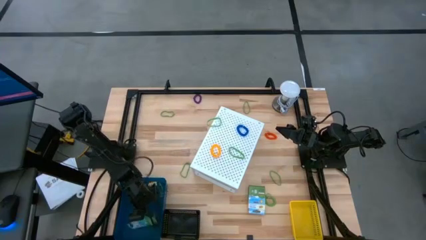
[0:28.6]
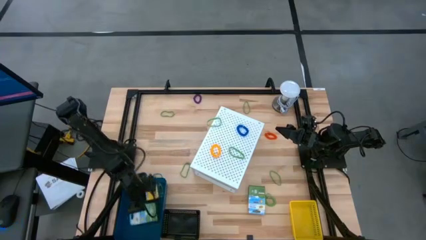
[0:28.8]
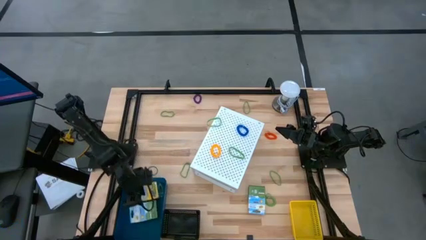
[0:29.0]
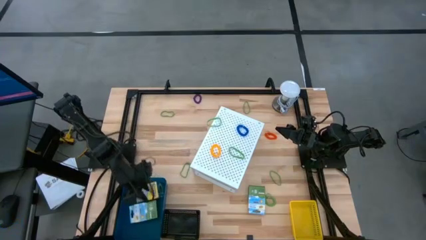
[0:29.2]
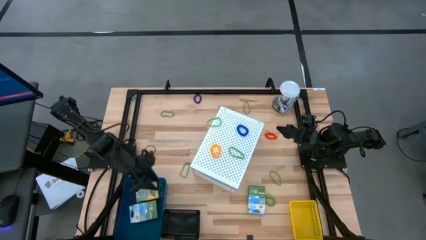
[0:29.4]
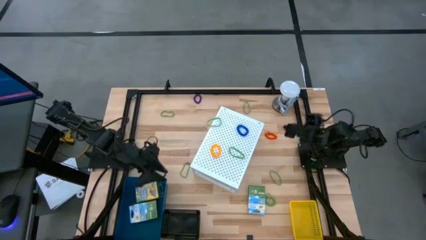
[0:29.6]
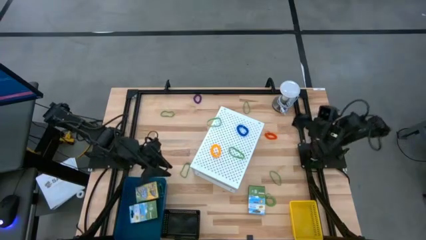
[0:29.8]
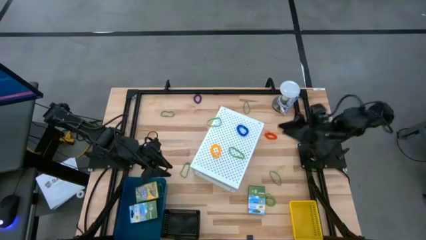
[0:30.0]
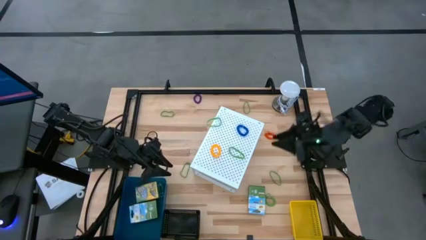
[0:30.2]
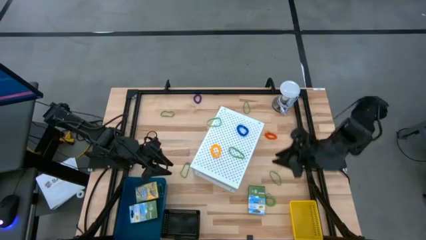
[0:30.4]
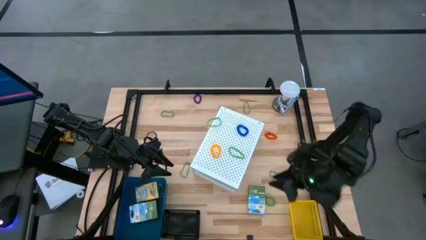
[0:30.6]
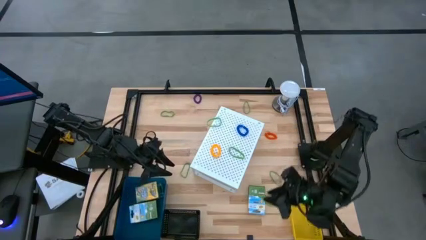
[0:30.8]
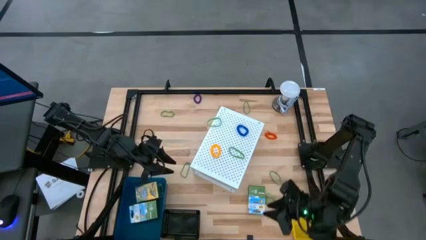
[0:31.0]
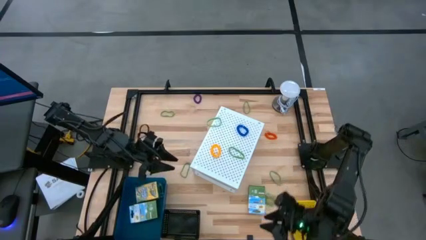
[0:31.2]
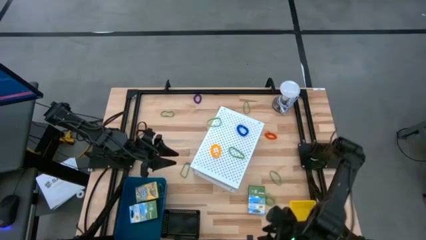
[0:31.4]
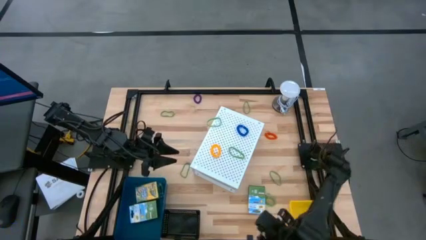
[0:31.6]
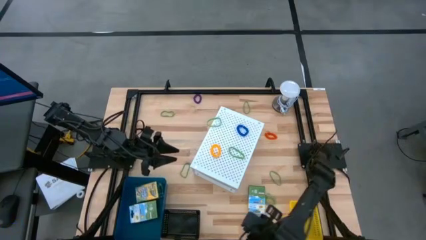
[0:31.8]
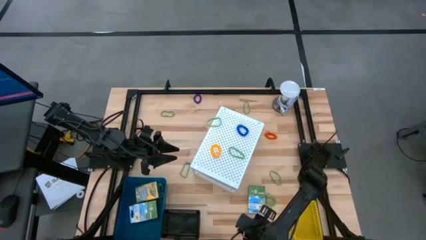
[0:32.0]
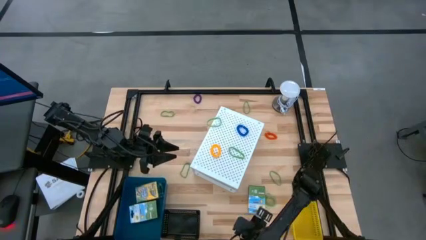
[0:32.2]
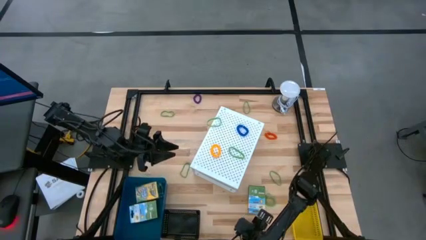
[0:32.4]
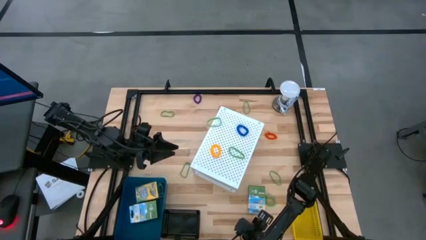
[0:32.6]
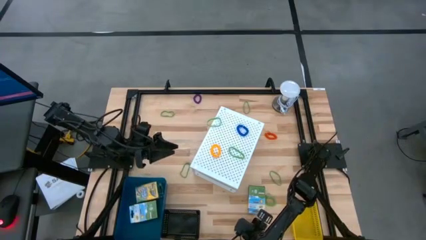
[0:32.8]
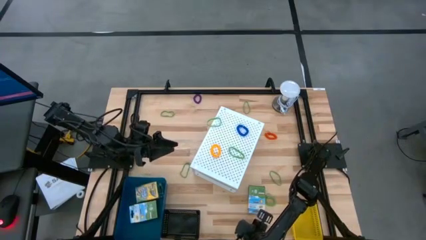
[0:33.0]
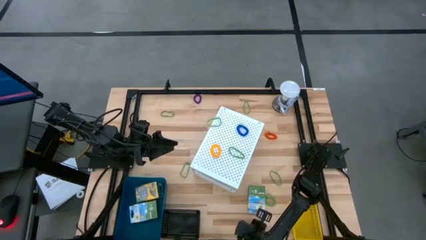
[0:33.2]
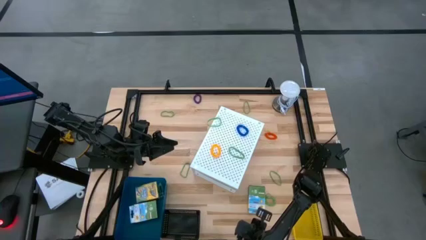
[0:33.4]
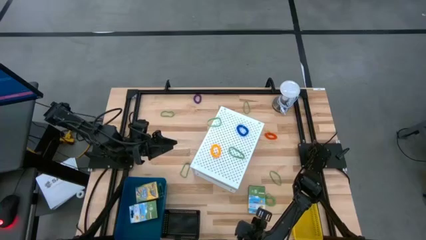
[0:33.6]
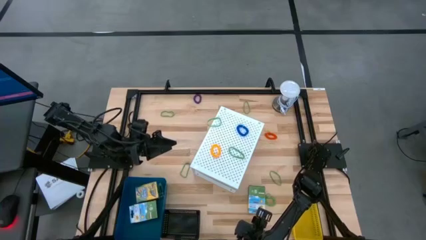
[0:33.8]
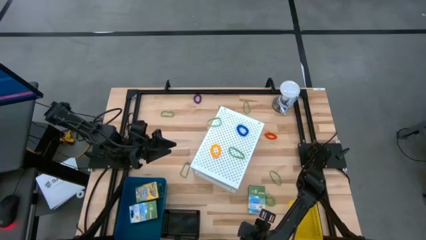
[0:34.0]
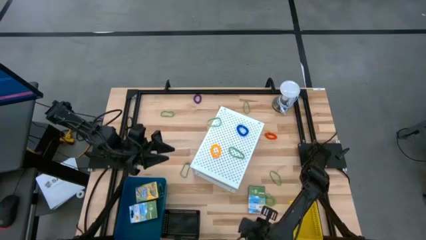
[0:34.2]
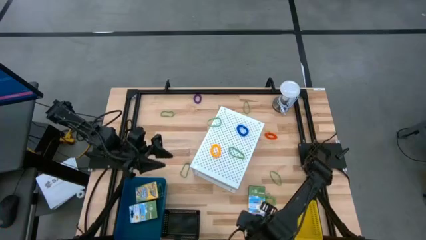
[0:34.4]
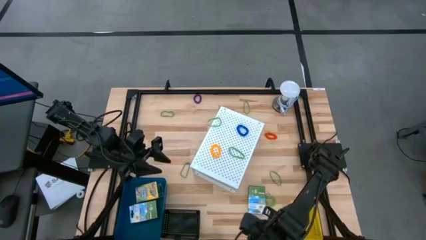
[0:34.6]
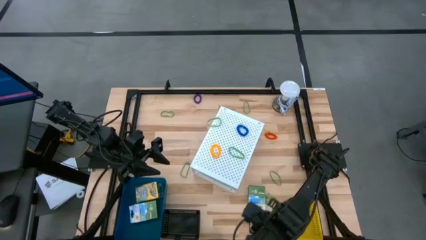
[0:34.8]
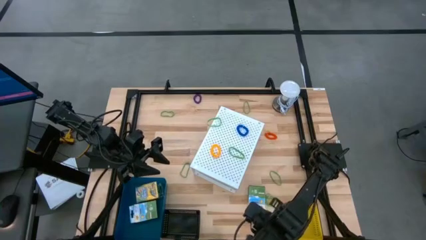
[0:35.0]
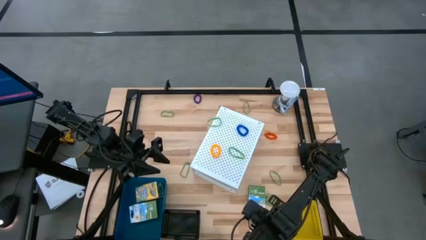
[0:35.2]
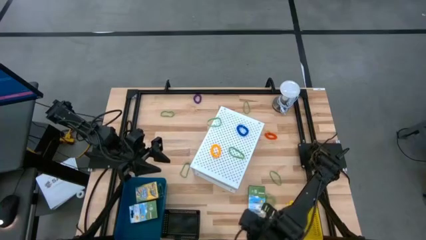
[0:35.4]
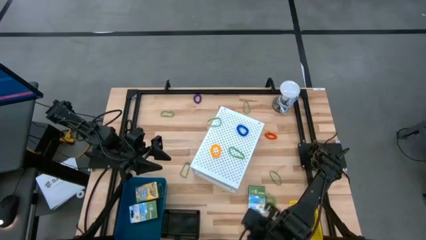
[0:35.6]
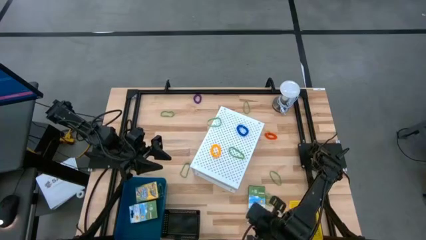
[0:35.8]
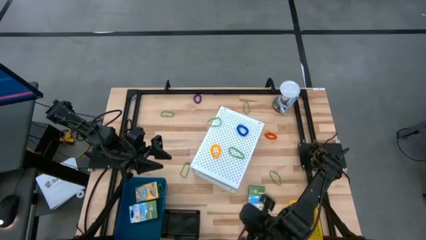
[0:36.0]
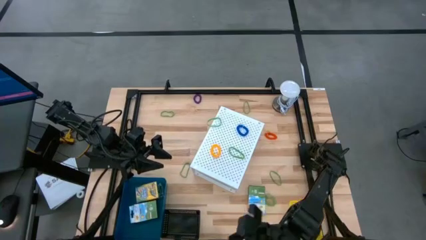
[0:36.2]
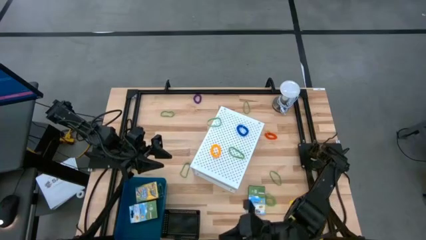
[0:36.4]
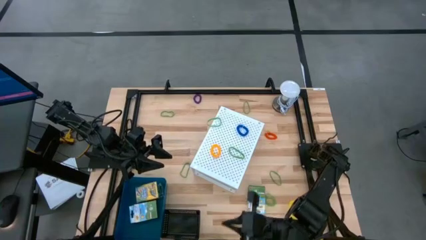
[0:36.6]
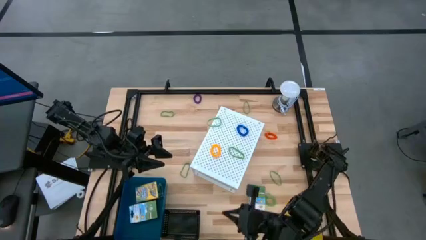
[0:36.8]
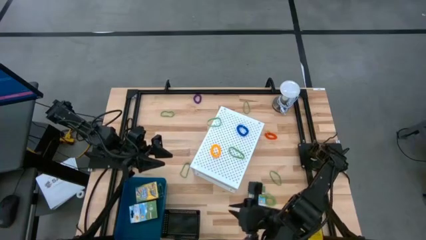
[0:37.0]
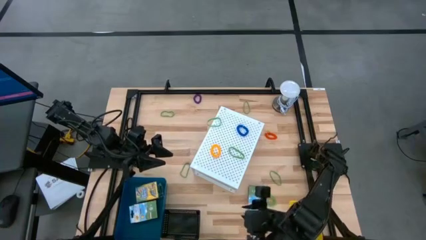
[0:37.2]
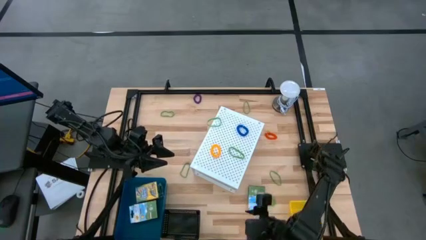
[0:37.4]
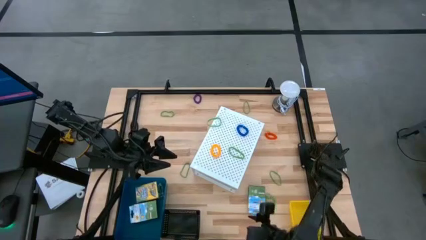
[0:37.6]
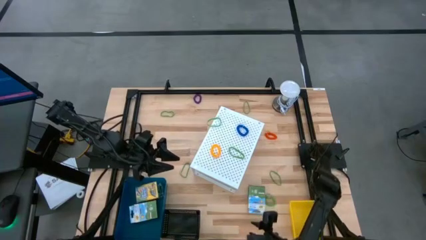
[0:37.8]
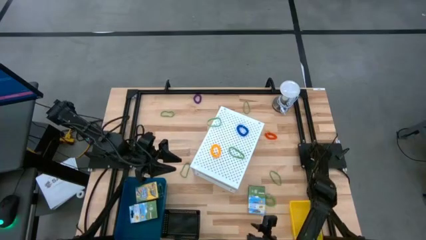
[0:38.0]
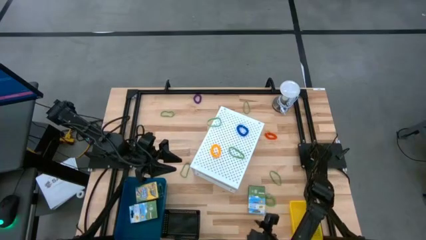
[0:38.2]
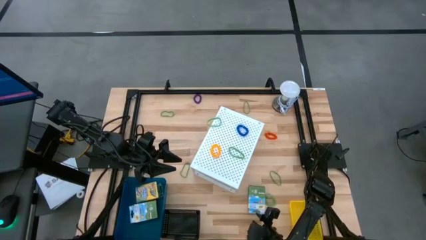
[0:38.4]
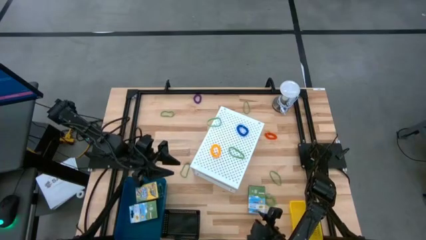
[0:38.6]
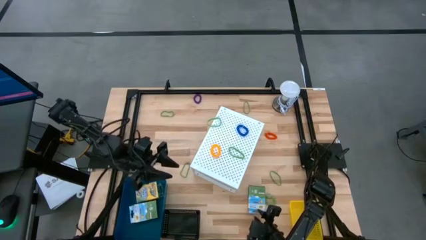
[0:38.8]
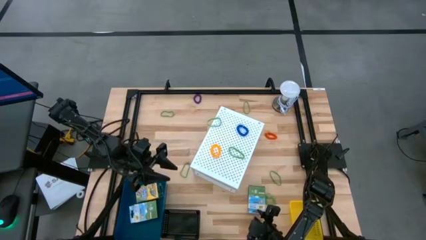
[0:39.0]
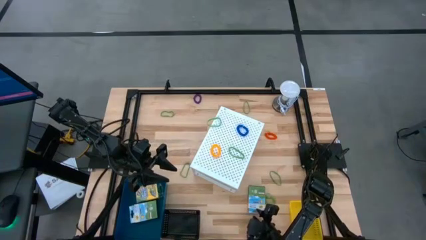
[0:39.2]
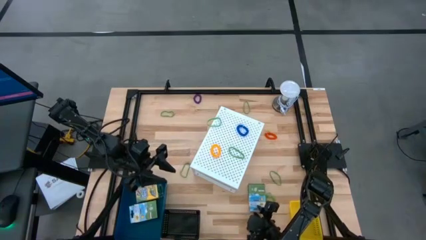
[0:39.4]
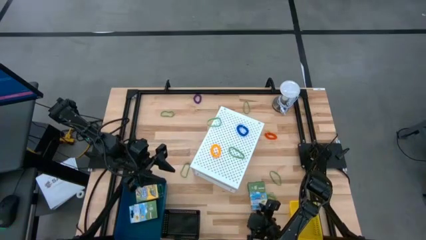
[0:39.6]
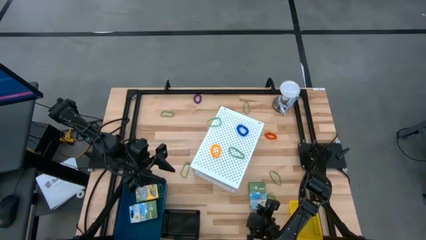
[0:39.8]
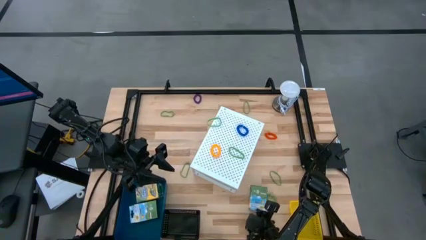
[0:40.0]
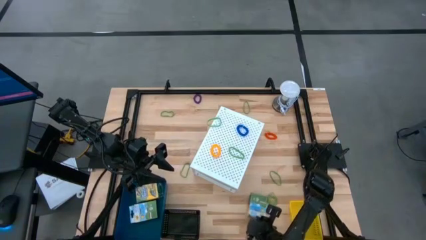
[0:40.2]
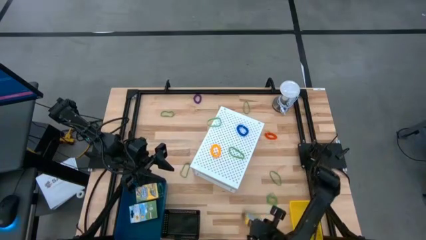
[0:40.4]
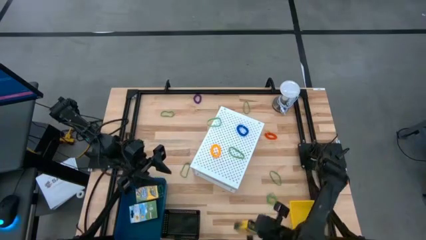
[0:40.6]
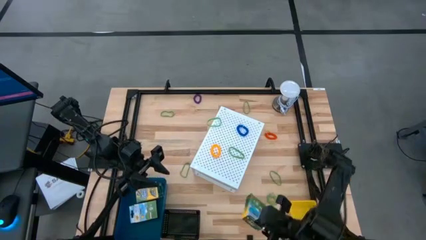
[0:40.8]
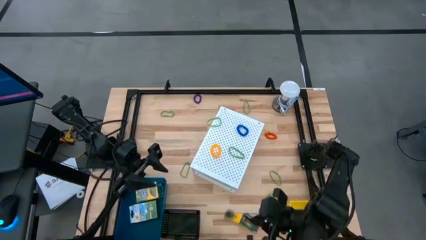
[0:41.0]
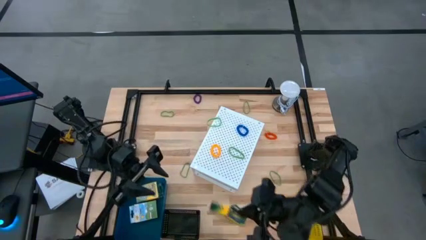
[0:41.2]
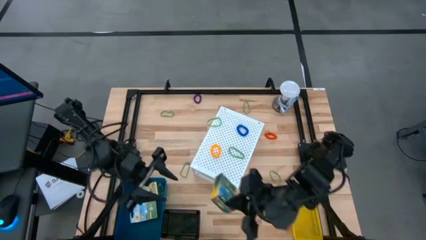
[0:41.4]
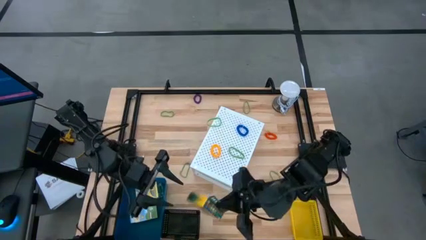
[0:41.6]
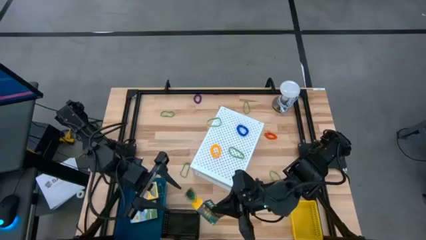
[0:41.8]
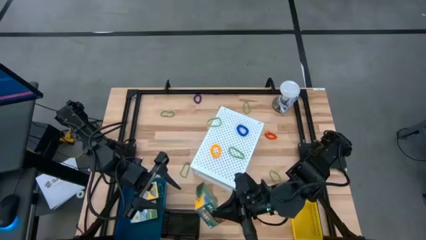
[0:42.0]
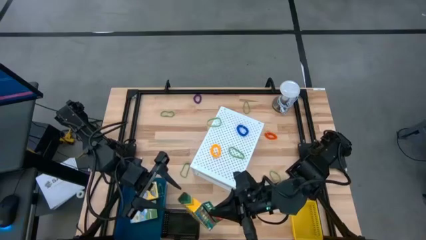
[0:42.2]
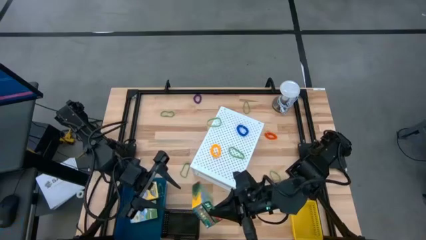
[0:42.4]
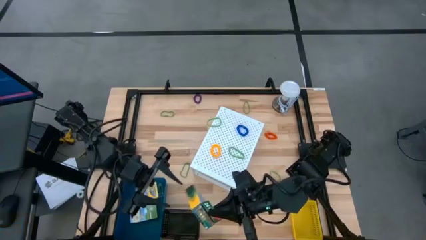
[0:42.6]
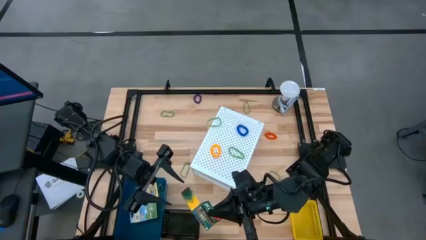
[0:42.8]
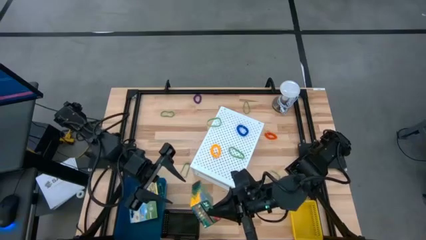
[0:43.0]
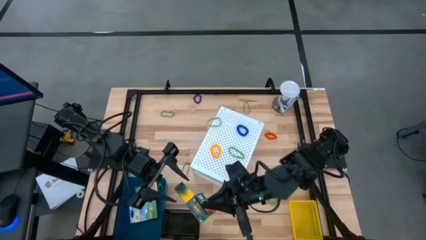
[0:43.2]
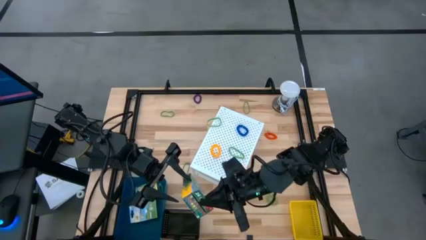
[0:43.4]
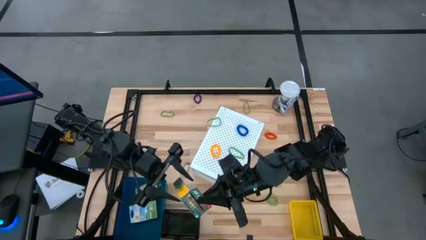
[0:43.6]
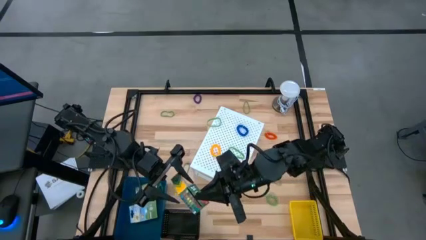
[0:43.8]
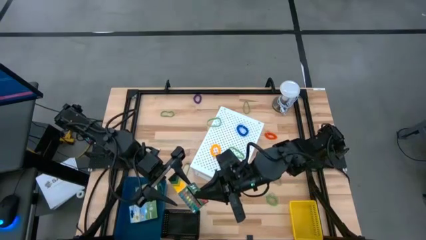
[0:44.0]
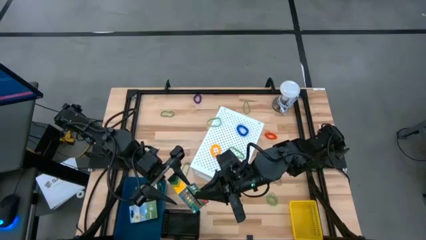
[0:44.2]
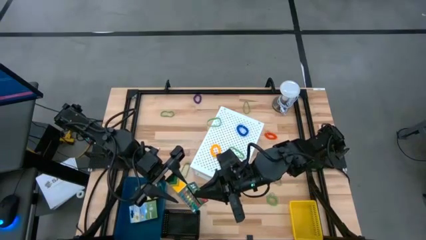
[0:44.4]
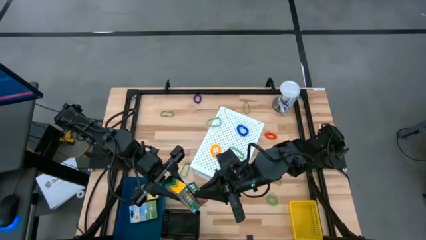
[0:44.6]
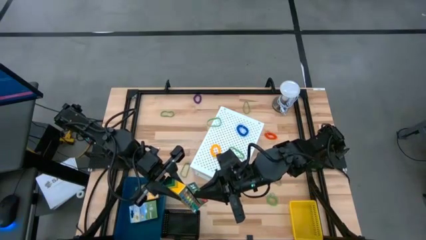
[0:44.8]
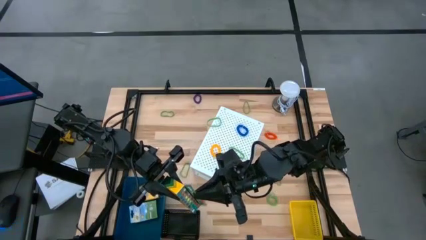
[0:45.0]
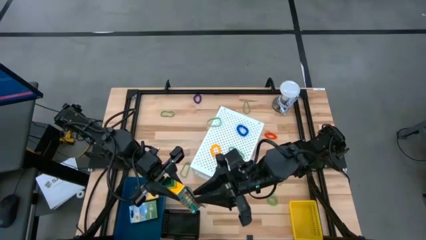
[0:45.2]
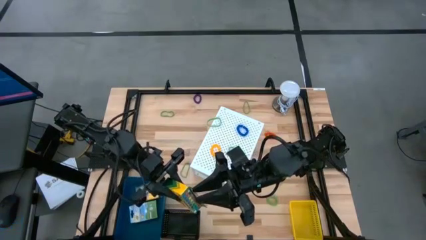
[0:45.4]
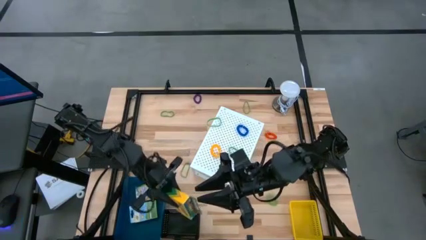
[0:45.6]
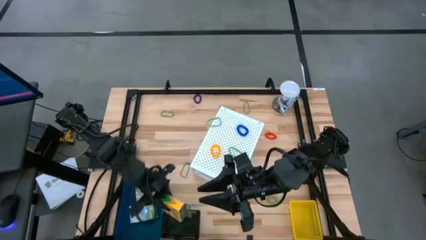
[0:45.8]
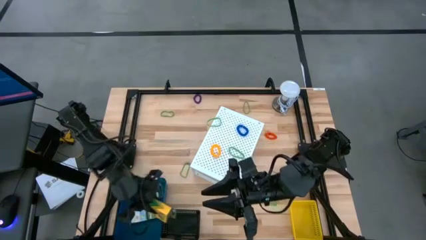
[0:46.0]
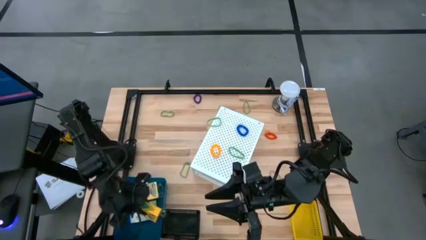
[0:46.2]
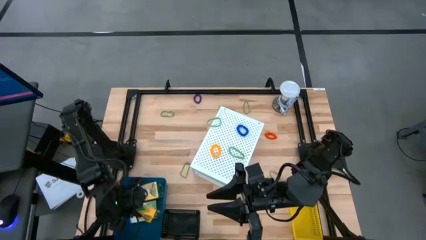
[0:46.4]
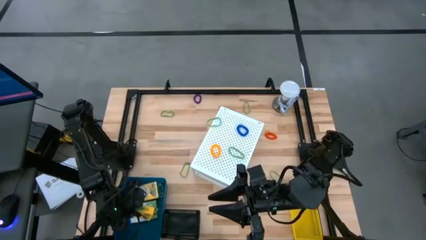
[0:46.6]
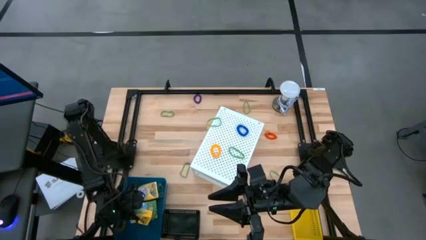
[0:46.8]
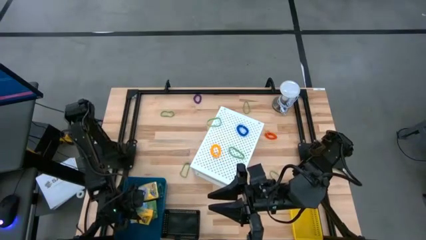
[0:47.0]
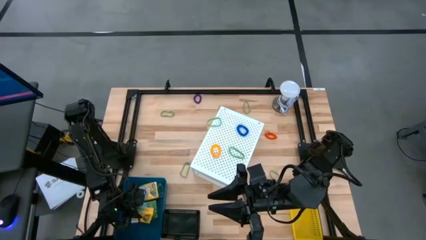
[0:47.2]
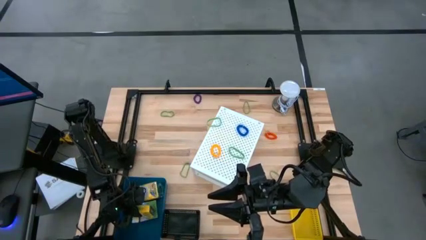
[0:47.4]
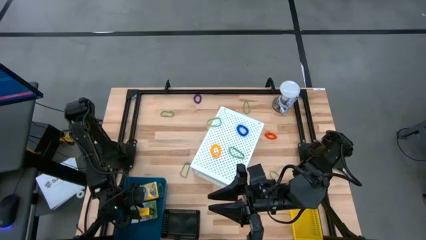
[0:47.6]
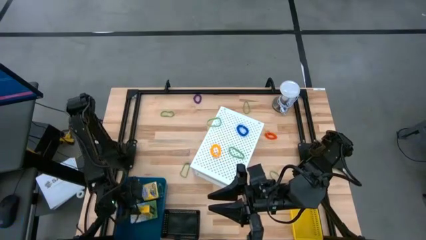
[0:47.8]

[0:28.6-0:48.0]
Task: Pick & Place Office Desk Supplies
Put the yellow crayon box into the blue bin
